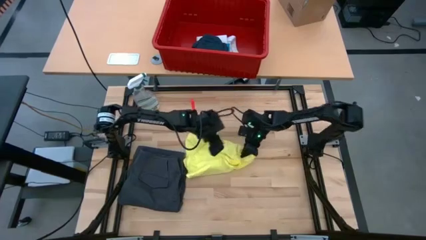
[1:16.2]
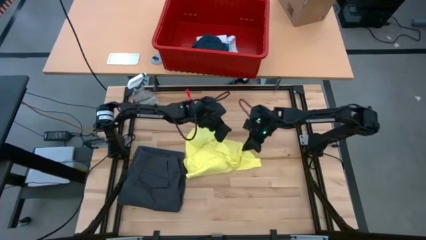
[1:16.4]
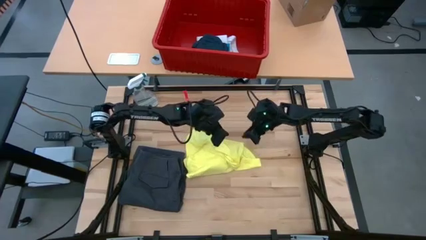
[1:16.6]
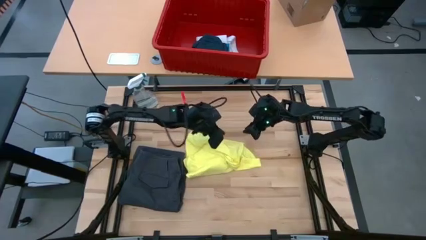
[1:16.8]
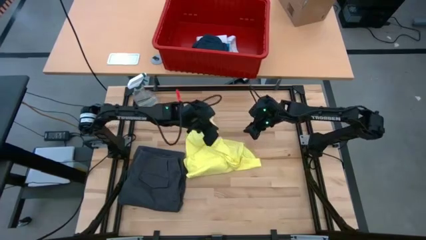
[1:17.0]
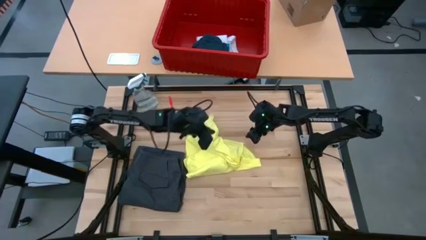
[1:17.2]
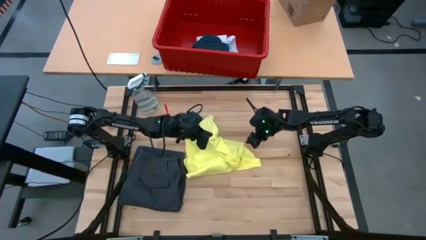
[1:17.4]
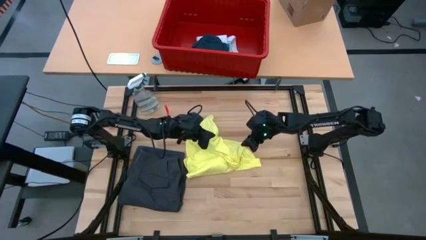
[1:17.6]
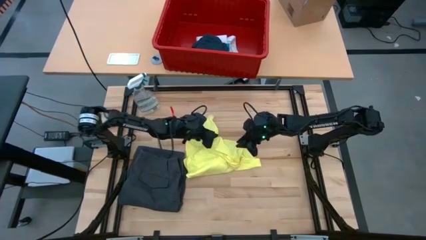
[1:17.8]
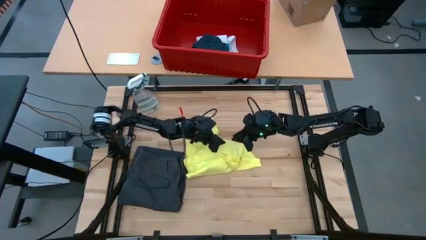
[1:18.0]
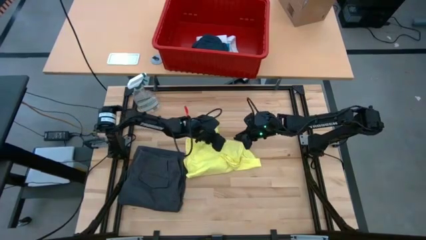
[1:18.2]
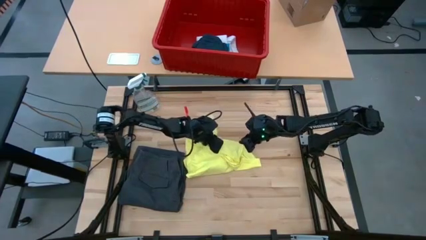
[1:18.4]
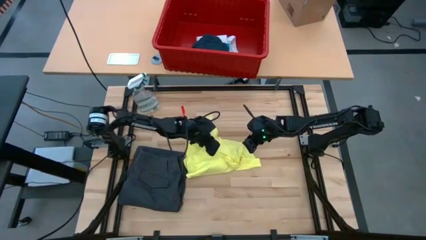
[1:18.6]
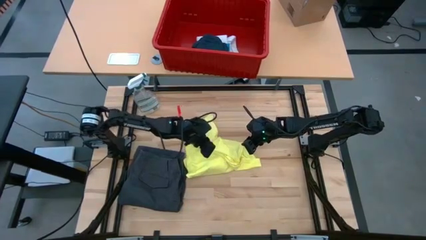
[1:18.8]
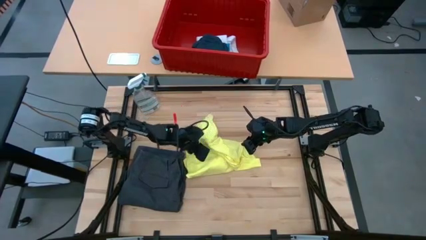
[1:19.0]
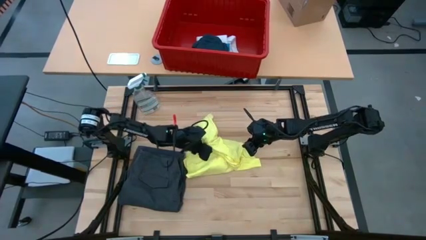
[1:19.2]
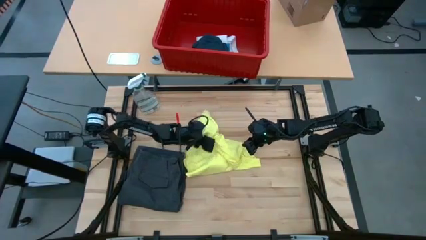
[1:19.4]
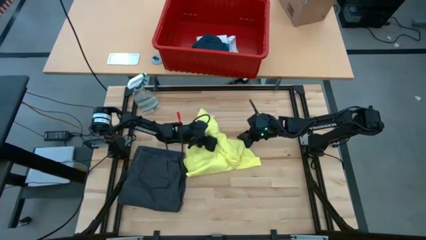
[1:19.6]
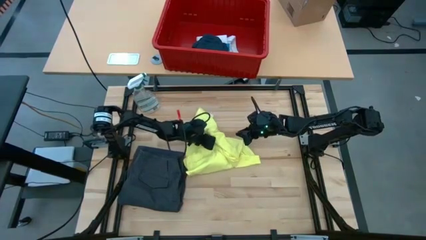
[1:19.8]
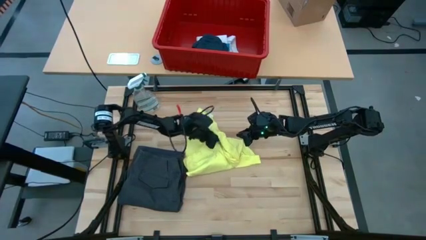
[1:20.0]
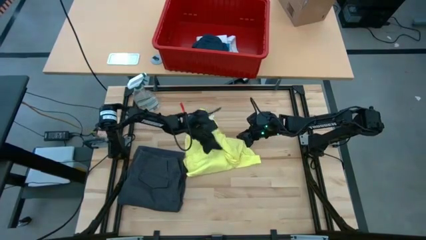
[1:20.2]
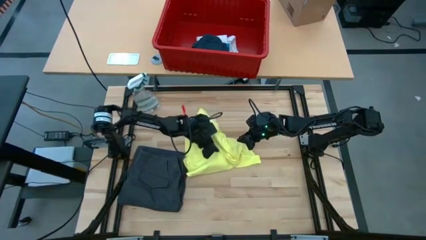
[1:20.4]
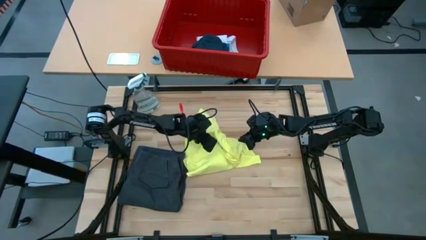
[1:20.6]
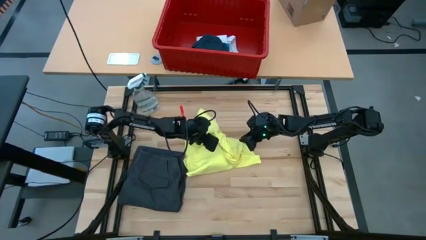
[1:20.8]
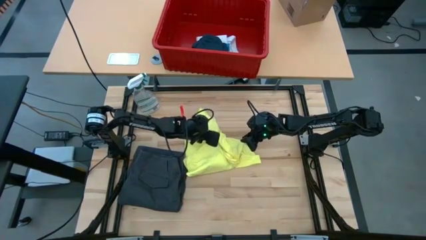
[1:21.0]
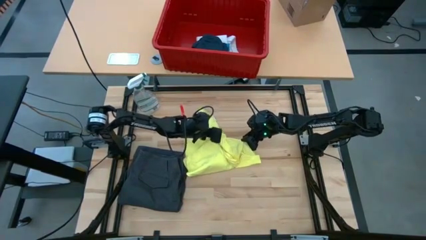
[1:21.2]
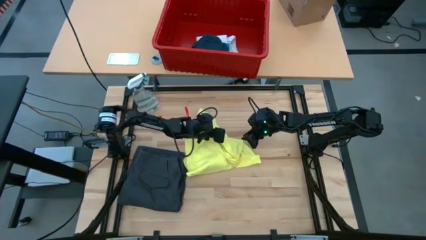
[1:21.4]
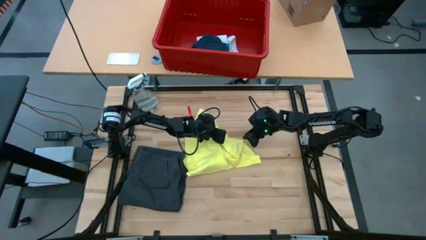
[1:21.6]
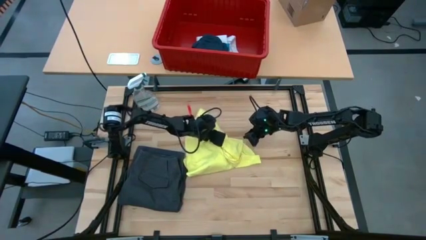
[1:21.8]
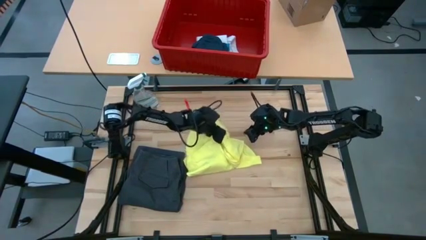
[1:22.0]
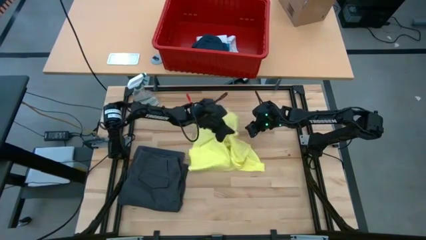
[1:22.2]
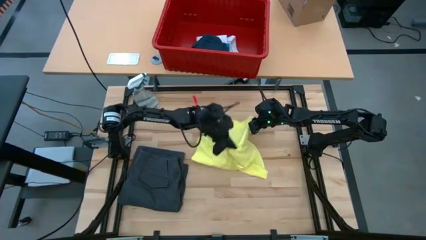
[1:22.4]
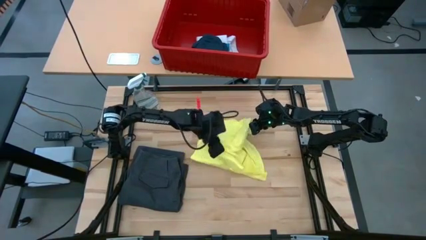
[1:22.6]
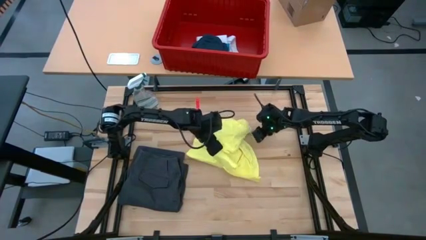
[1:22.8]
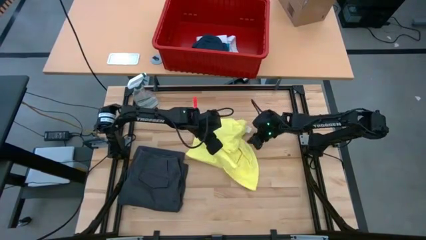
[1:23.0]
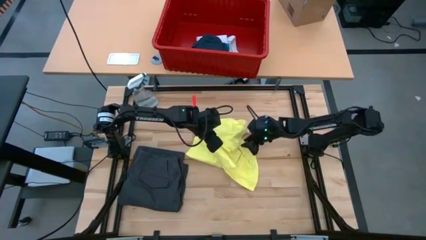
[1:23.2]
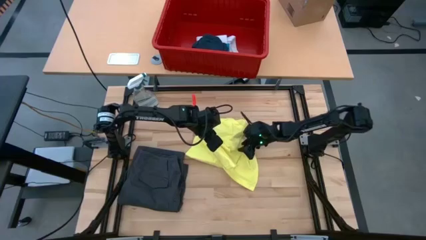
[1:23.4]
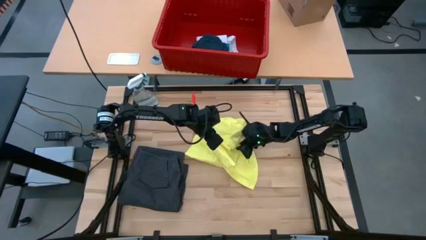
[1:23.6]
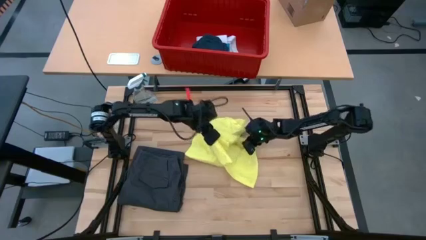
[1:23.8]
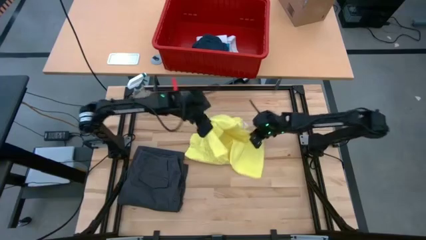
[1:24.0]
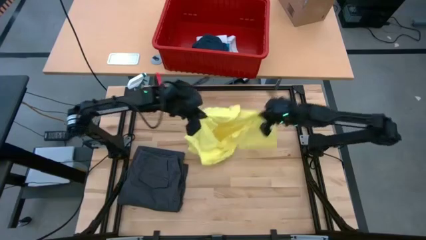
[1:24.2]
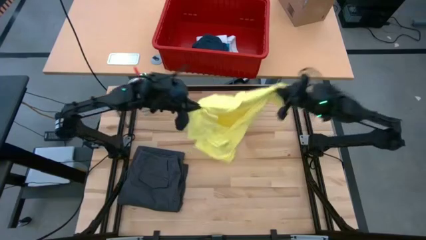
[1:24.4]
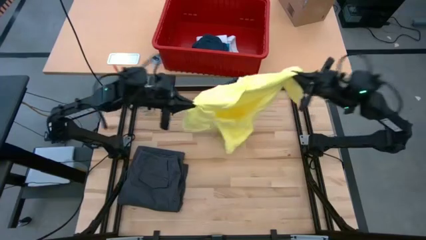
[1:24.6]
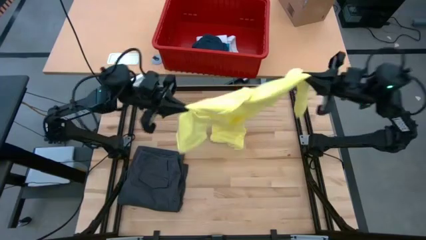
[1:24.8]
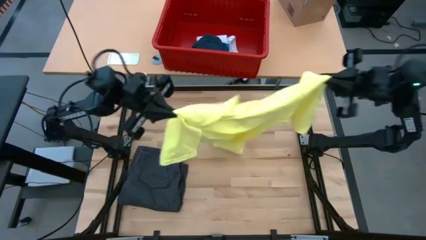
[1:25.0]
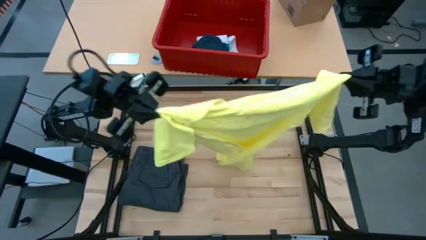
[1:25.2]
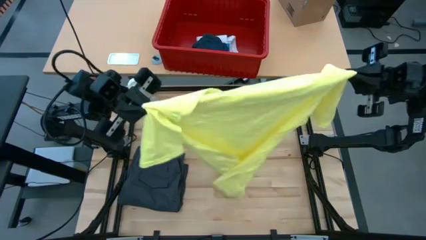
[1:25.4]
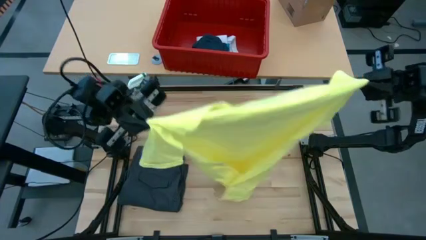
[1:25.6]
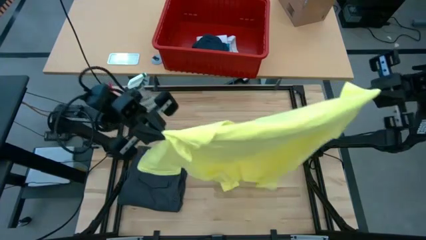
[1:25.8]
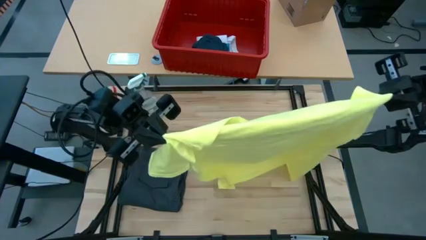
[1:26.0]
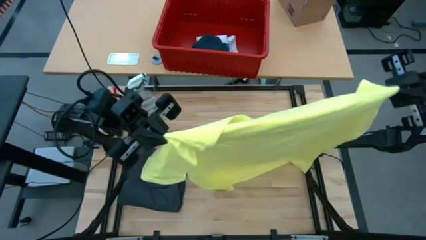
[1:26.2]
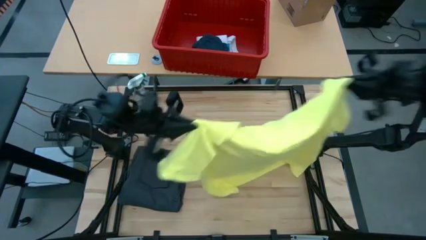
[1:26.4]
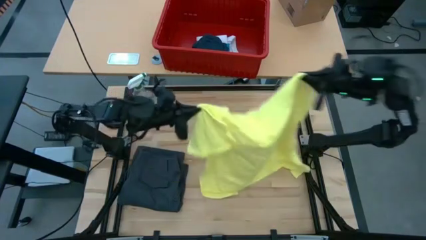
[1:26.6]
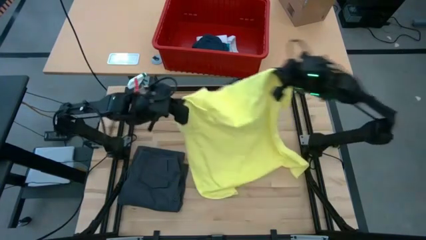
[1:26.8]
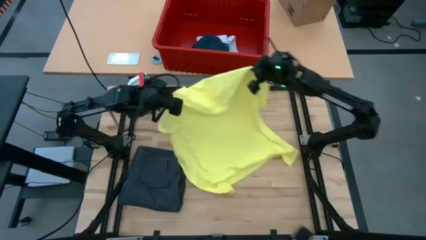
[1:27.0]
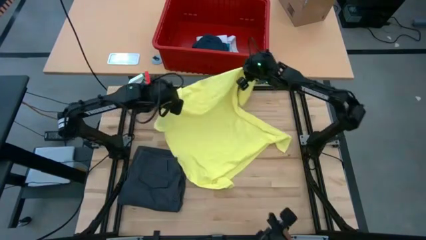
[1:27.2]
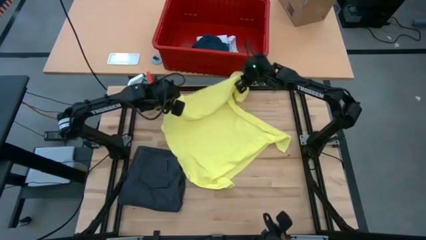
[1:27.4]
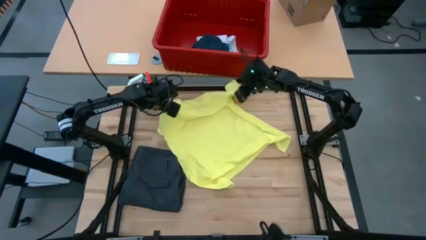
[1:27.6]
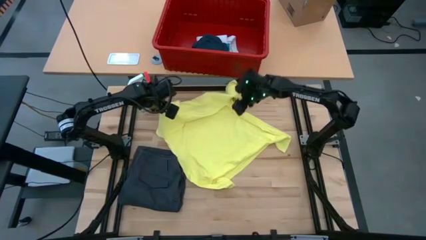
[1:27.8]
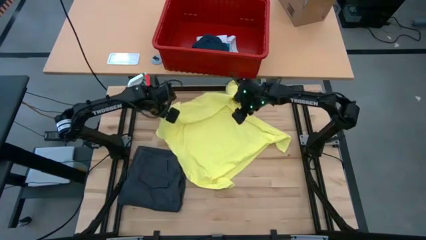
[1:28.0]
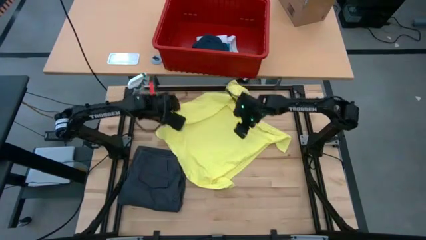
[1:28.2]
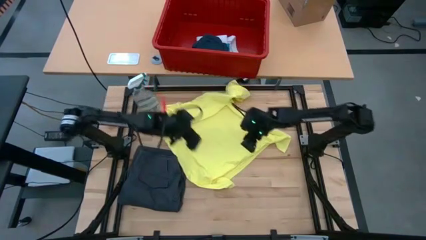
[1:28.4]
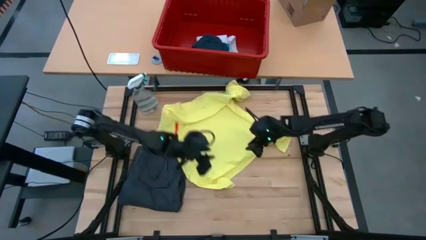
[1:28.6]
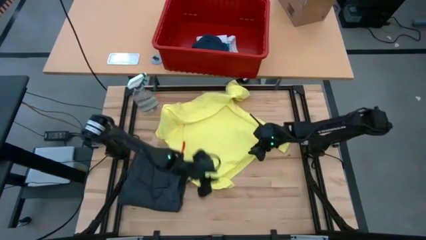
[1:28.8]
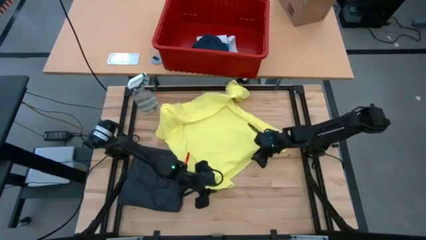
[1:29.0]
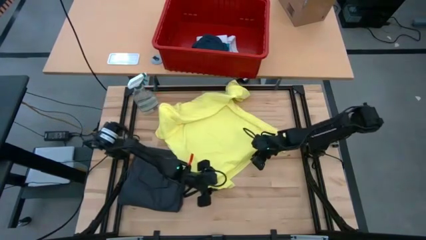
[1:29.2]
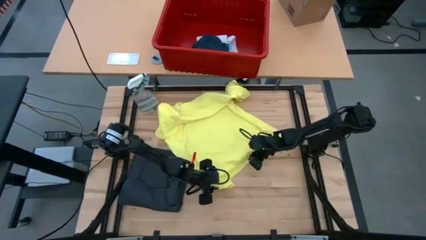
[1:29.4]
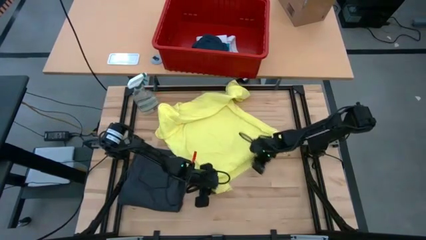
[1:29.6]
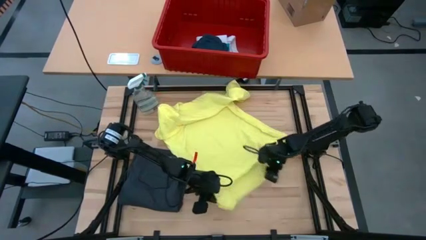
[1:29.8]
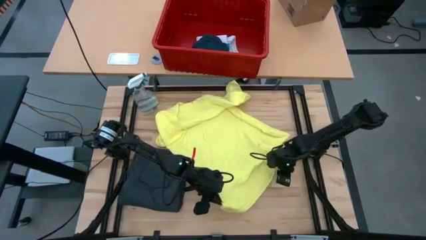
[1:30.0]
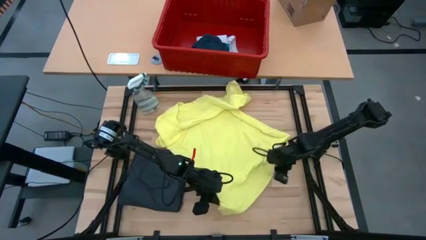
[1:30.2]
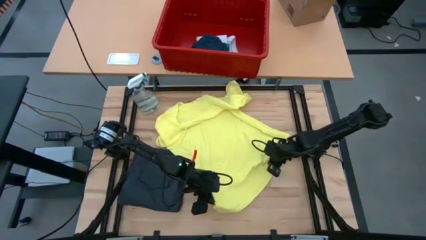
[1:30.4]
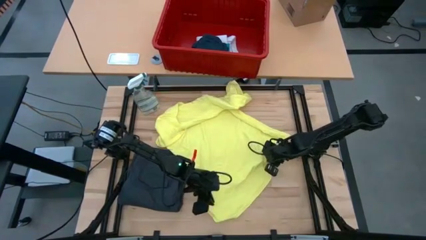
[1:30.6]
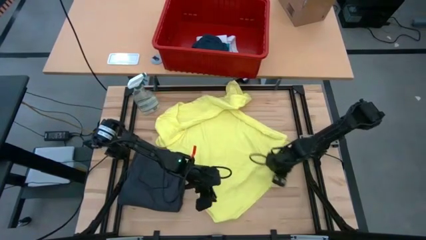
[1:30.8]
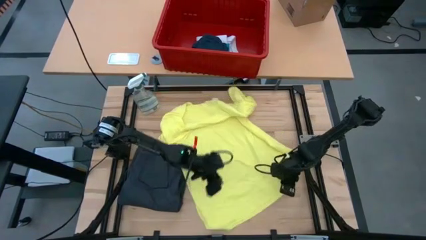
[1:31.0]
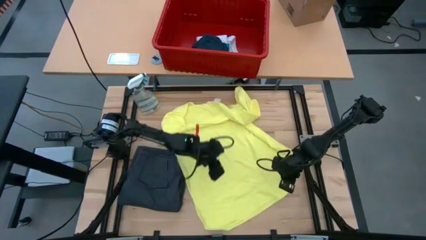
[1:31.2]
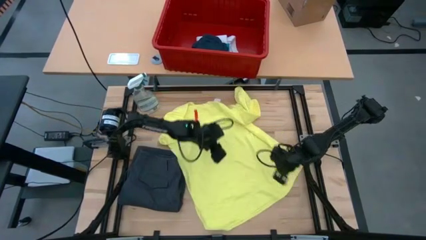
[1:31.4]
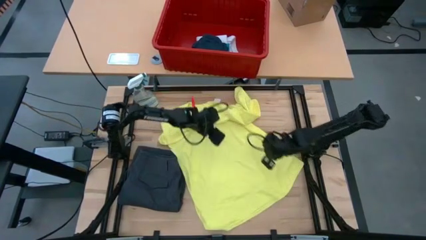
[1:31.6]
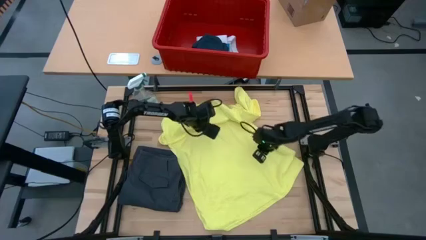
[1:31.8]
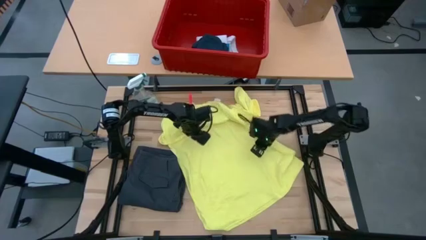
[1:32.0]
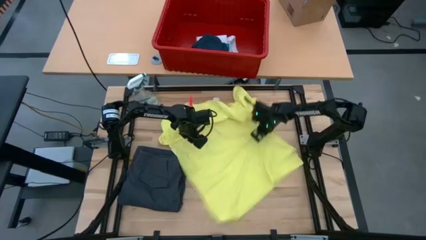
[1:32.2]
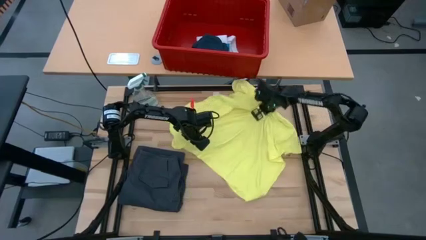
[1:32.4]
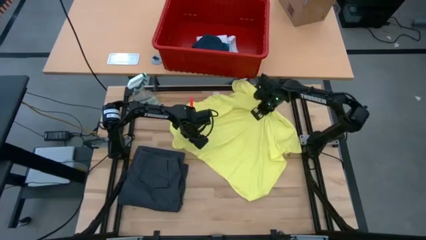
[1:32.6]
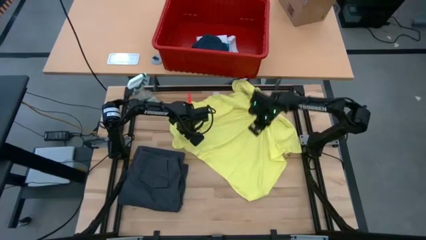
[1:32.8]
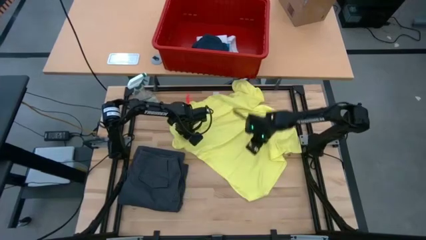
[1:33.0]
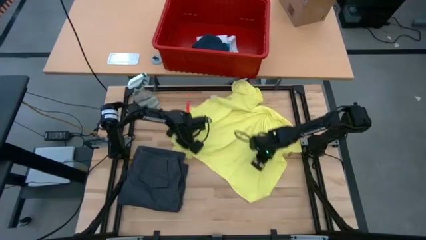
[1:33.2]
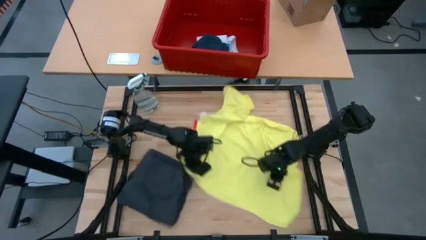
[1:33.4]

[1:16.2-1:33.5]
Task: Fold Laundry from Bin
Fold the yellow shirt
